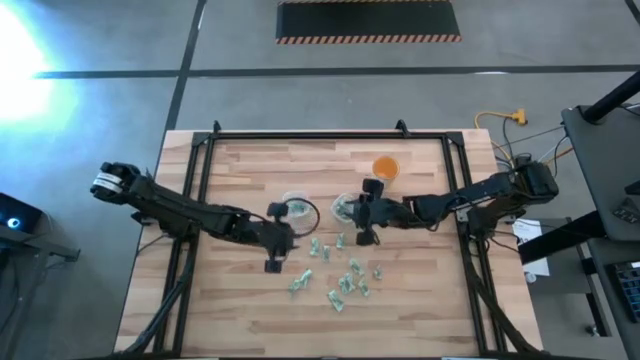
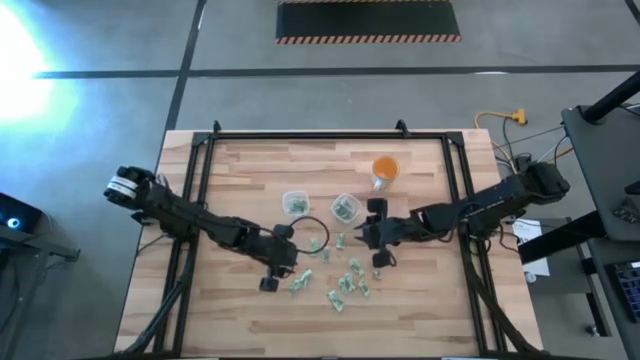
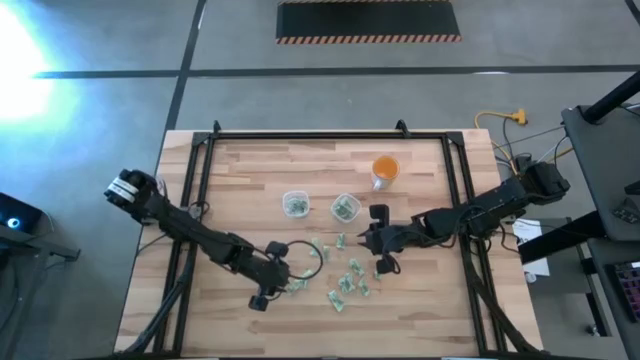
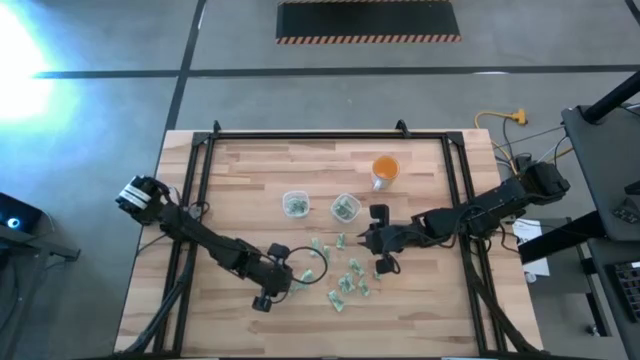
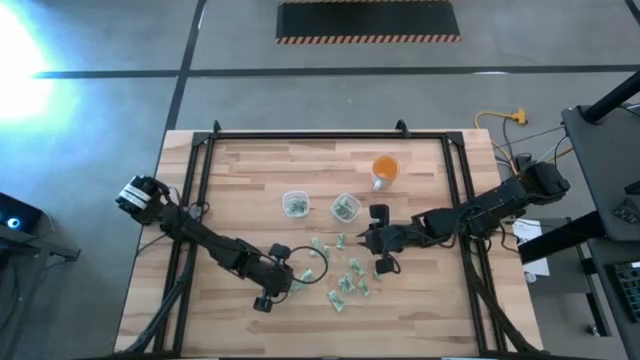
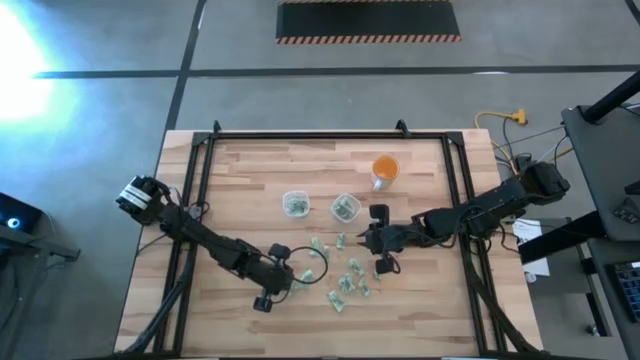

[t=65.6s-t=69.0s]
Task: Pick and place items into bin
Put the white stevia packet into the left transparent bin

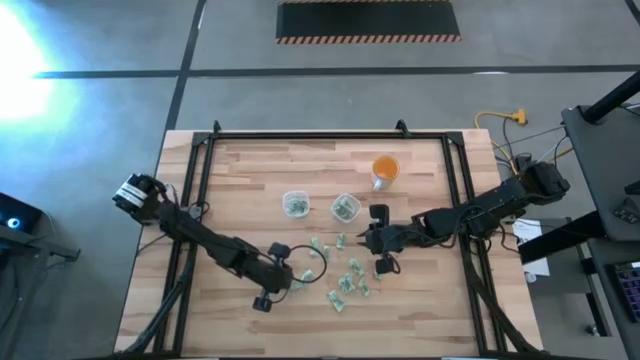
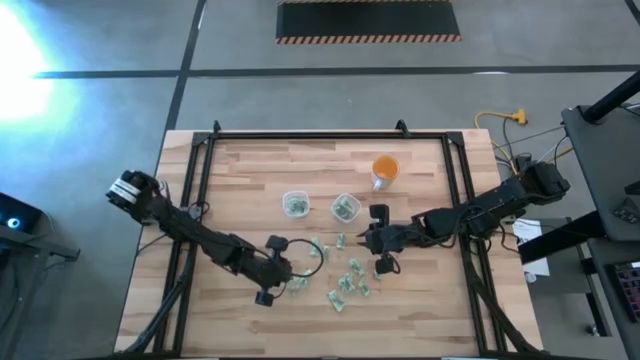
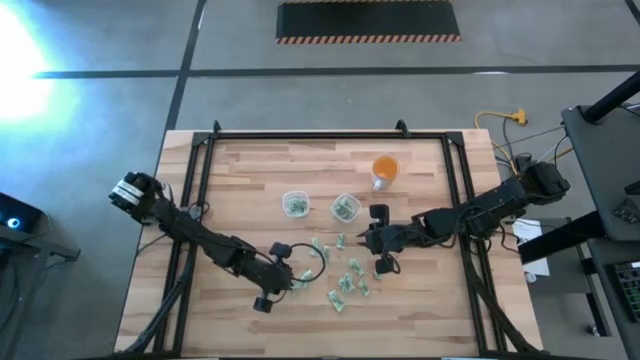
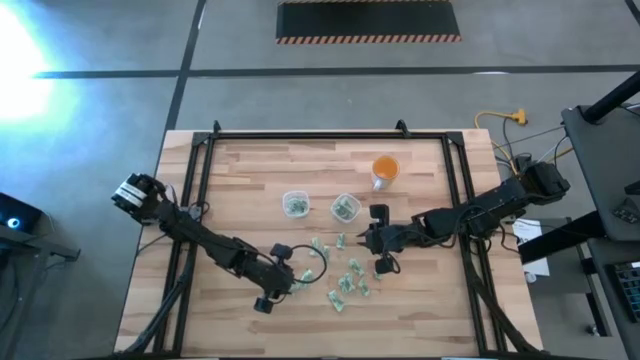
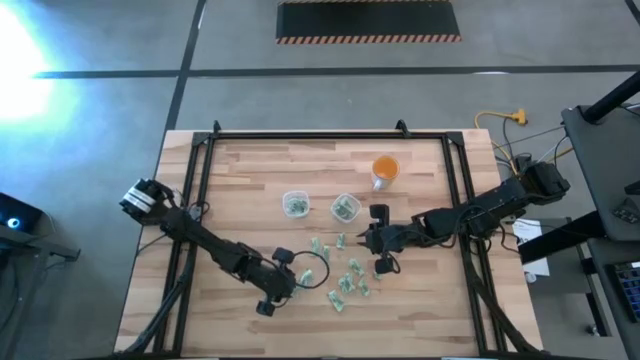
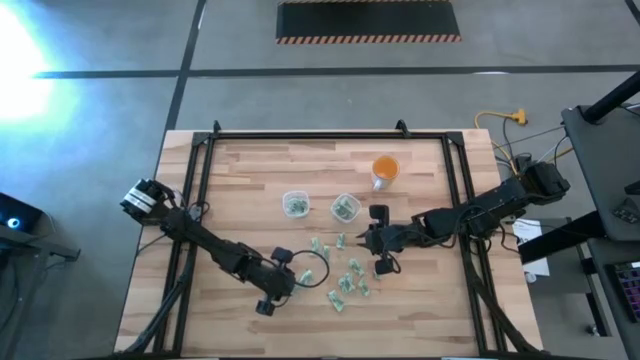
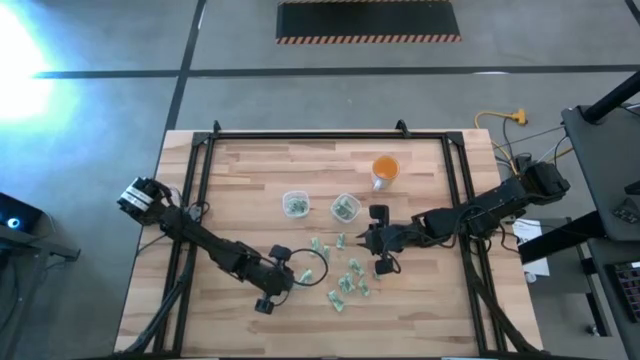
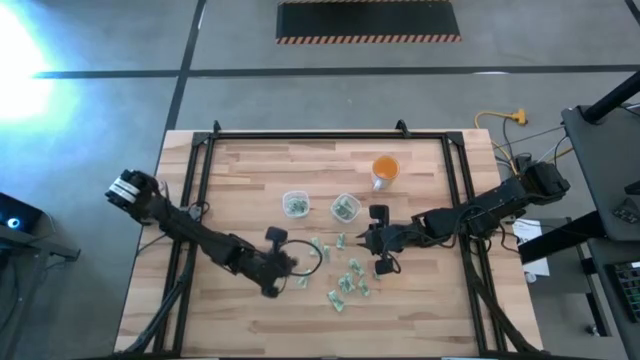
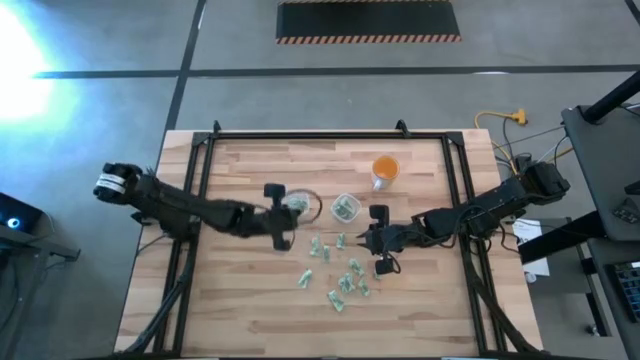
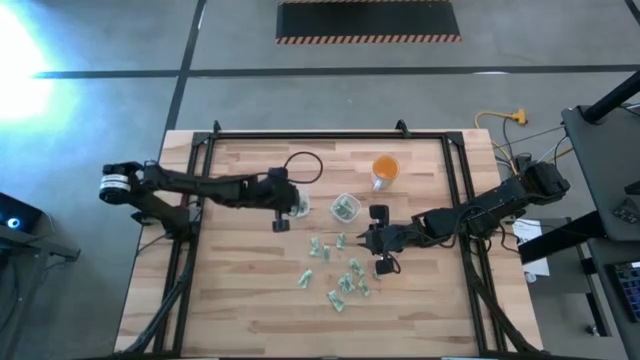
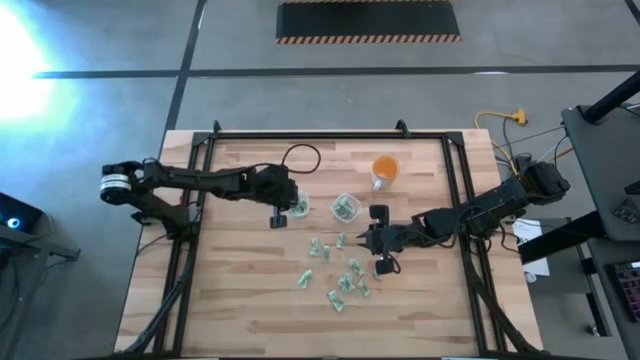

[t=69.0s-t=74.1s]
Put the white stevia packet into the left transparent bin

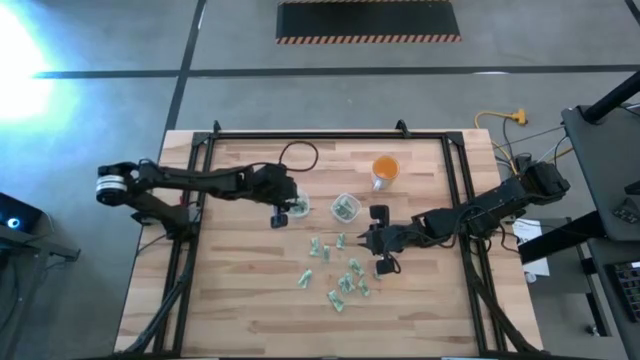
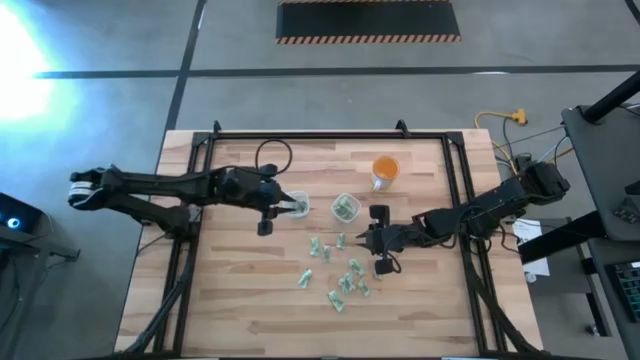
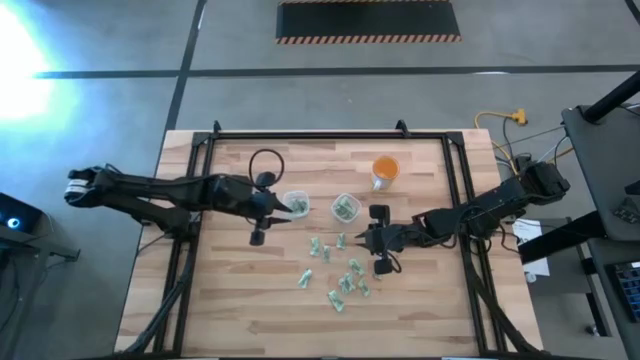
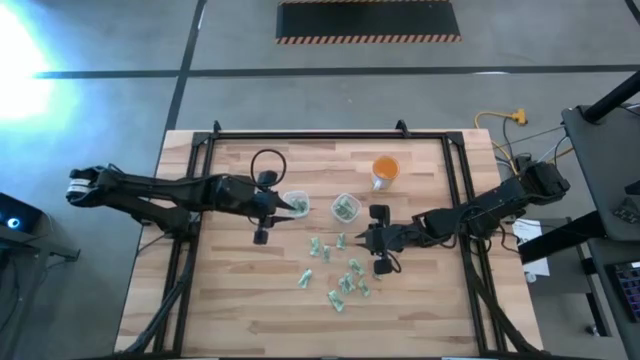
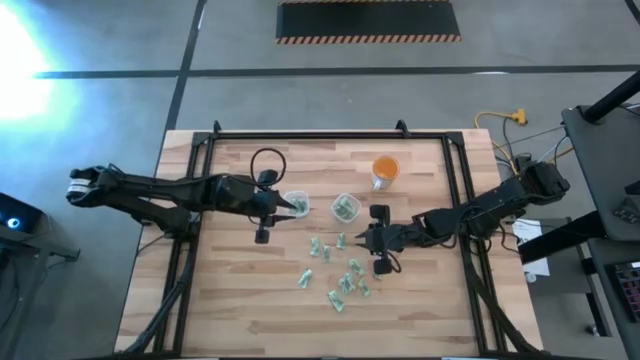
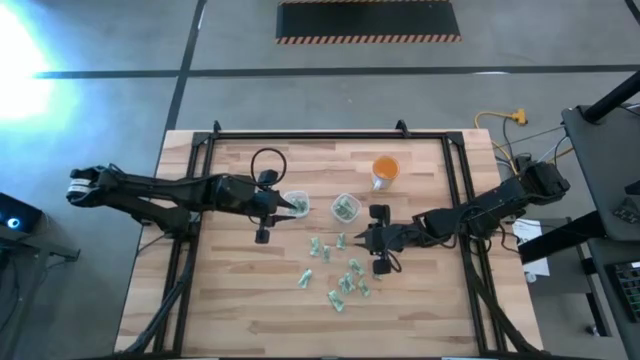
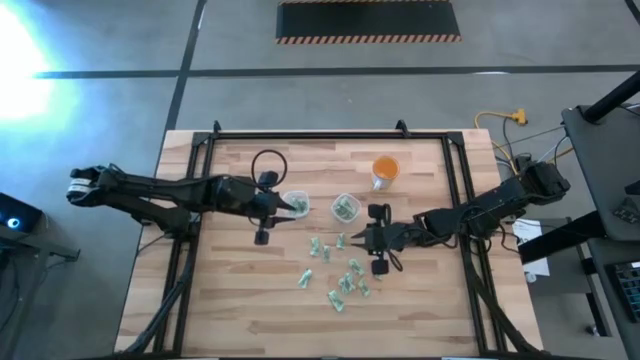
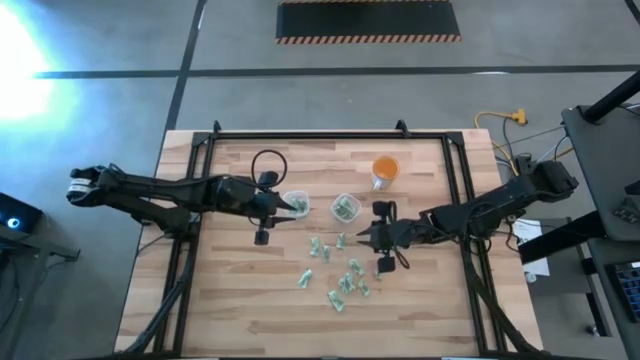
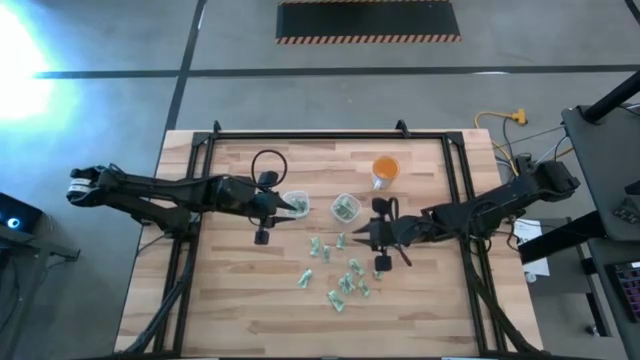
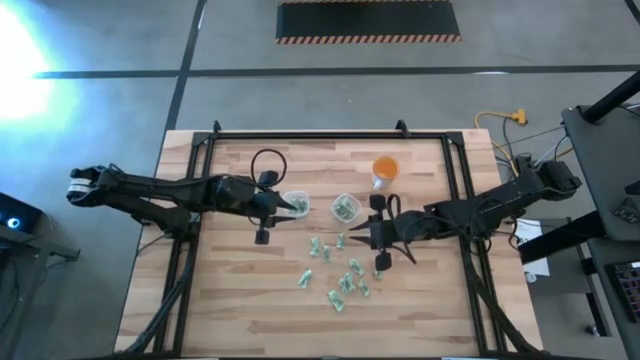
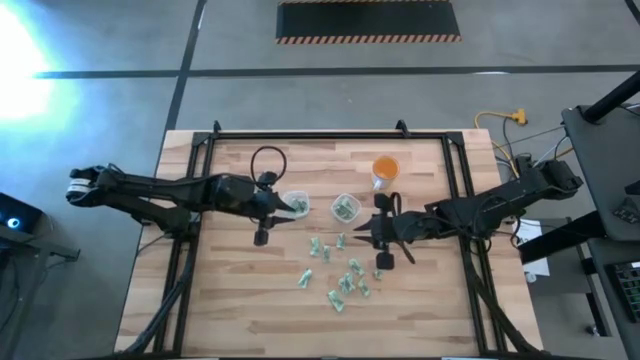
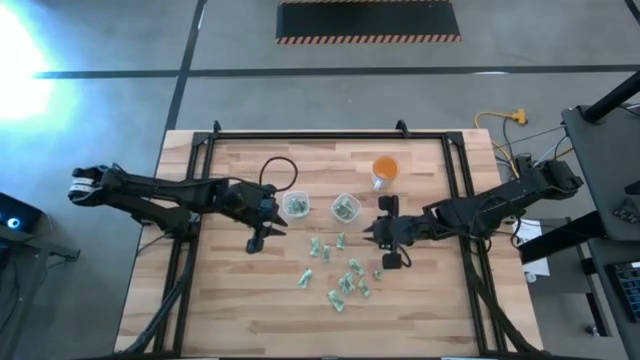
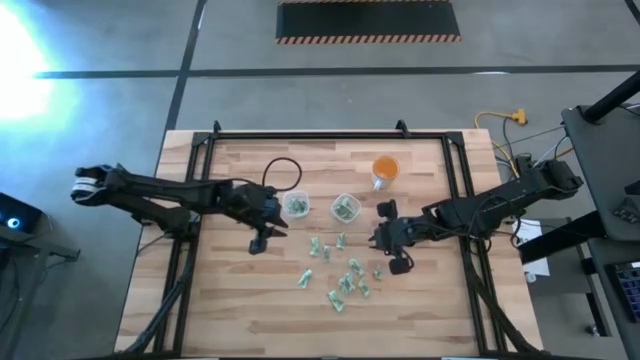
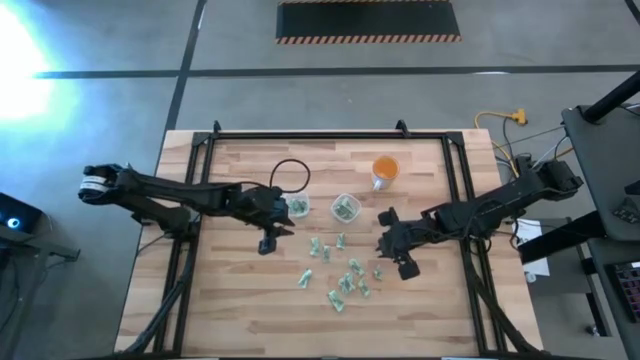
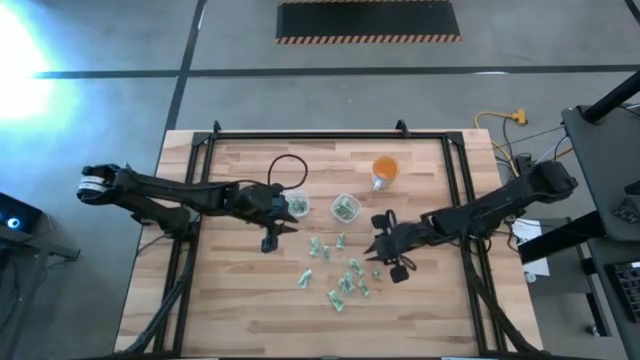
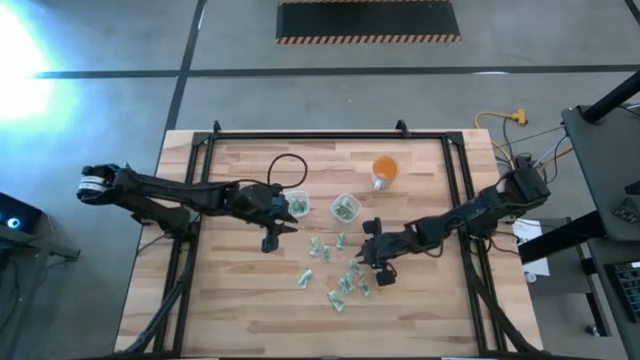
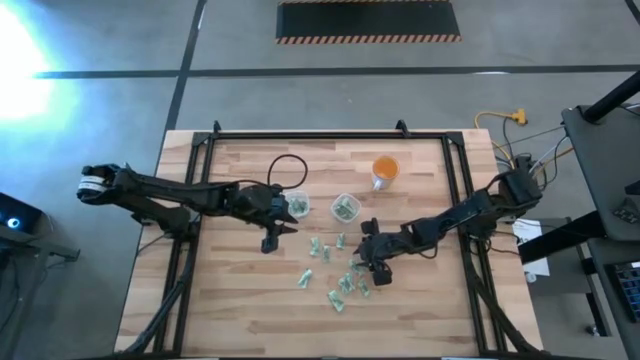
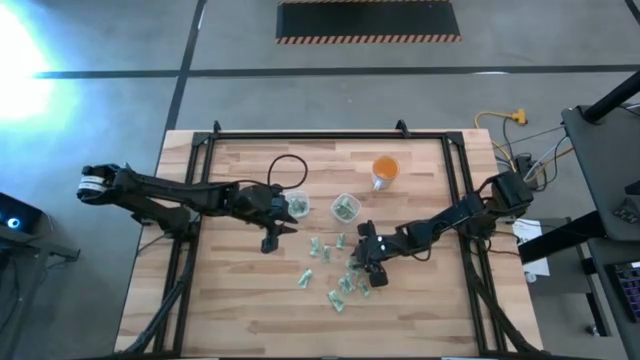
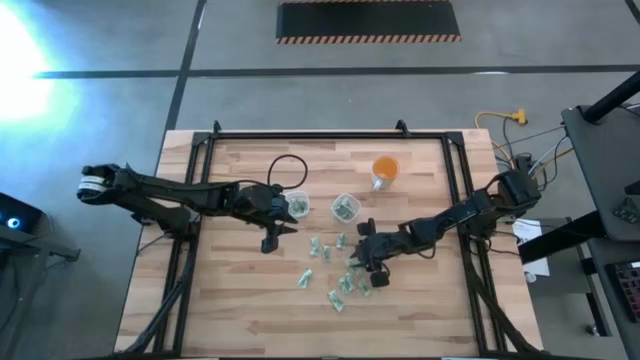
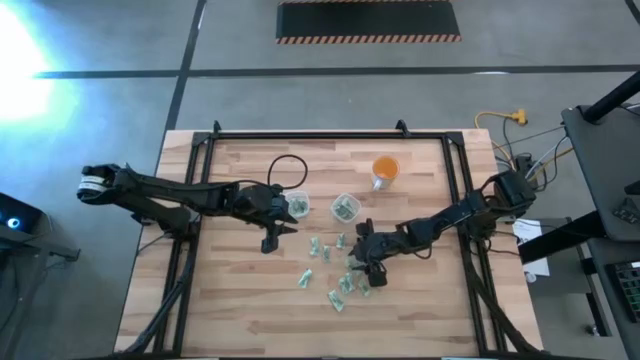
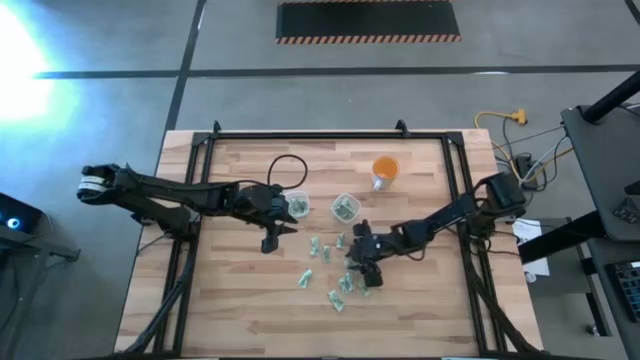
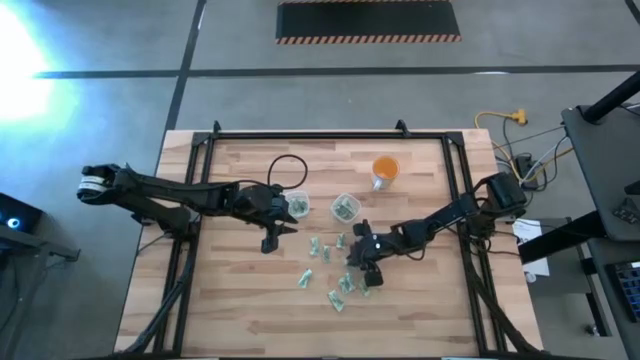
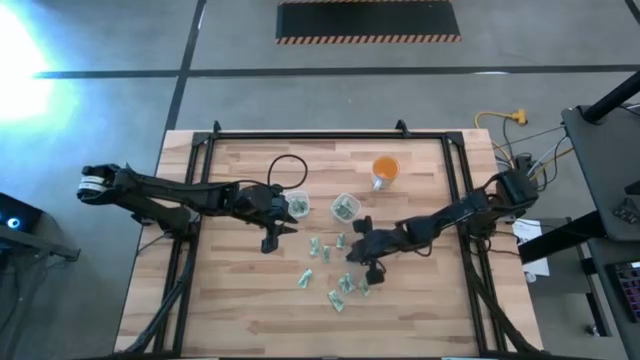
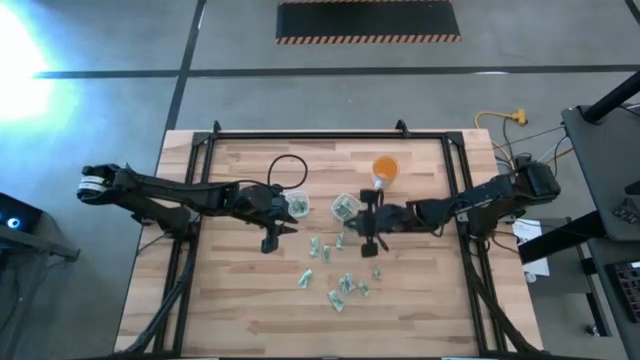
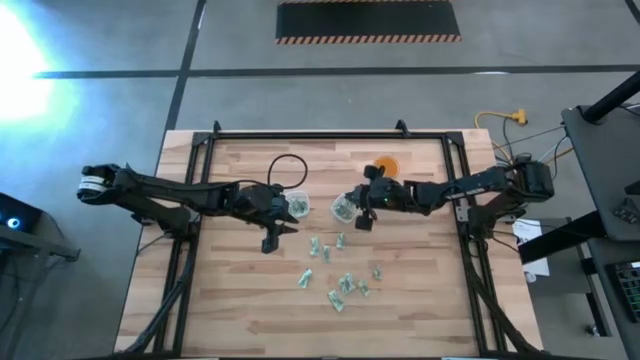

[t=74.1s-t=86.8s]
Put the white stevia packet into the right transparent bin

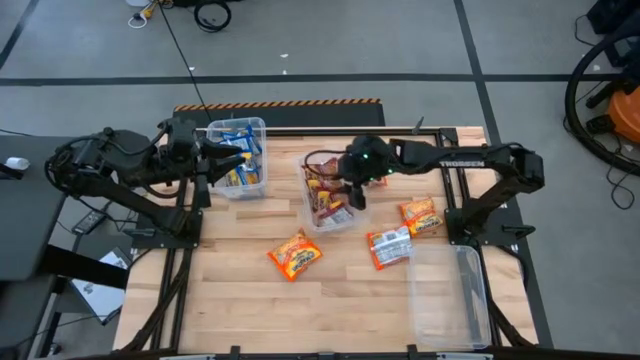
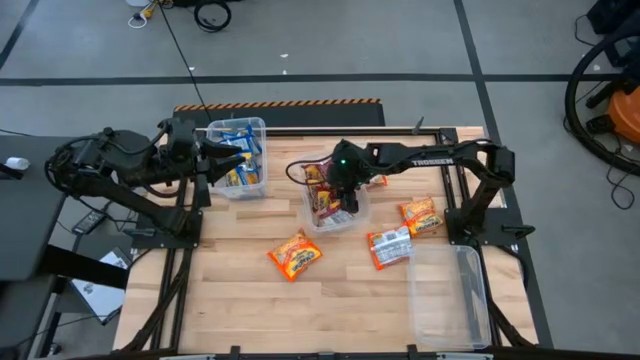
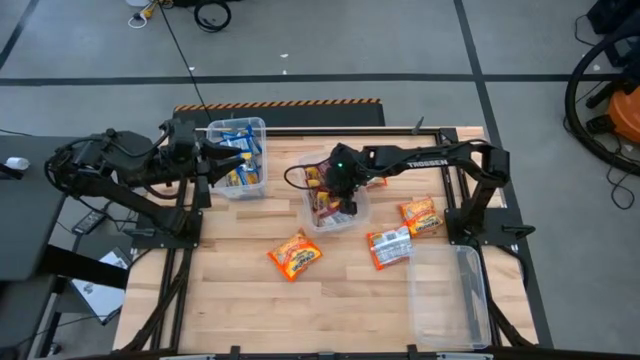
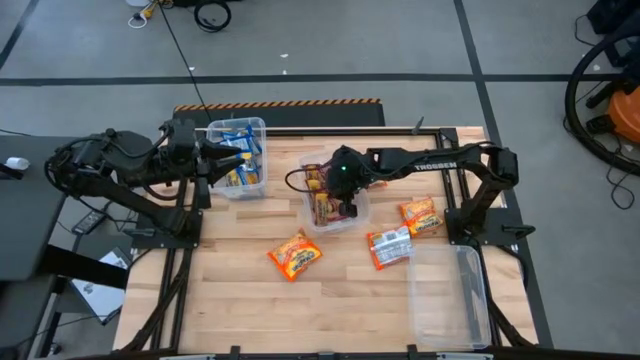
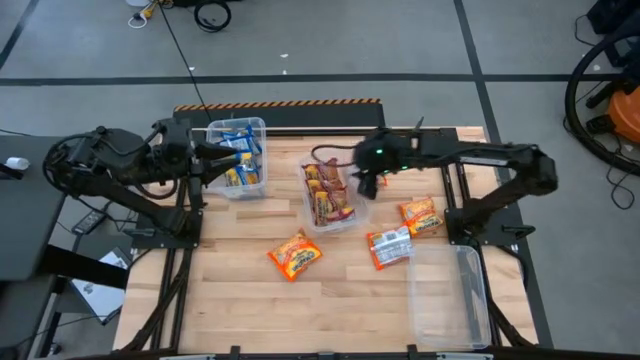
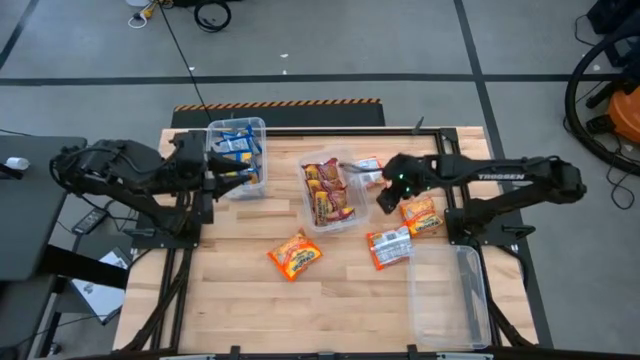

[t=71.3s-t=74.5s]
Task: Sort Maruchan noodles
Adjust the red noodle pack
